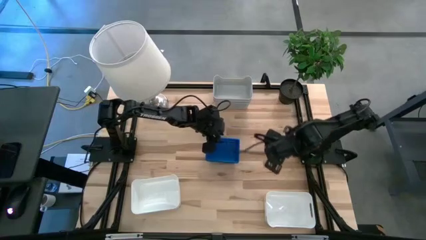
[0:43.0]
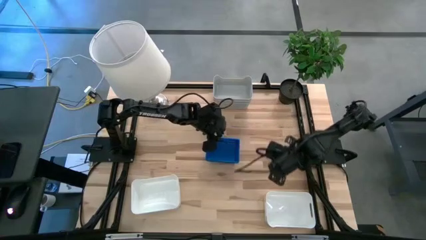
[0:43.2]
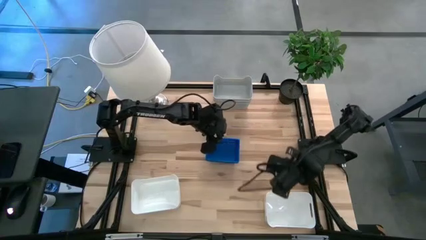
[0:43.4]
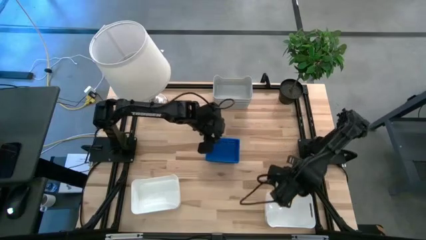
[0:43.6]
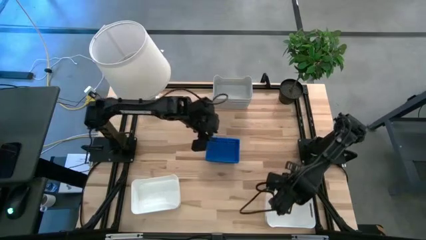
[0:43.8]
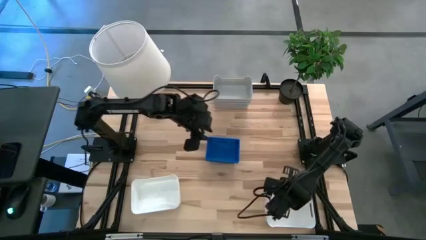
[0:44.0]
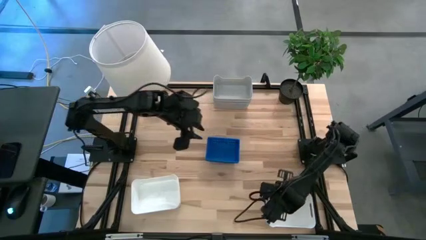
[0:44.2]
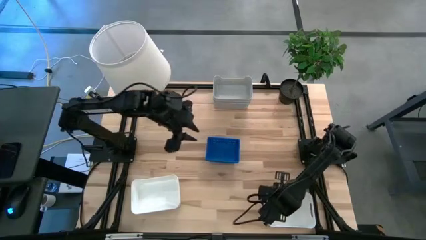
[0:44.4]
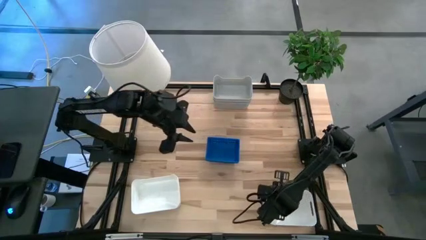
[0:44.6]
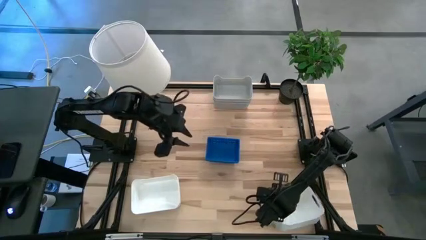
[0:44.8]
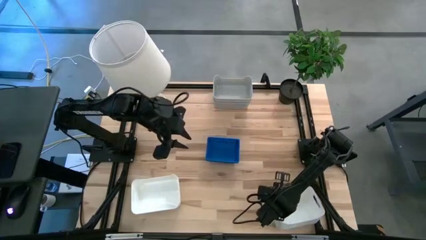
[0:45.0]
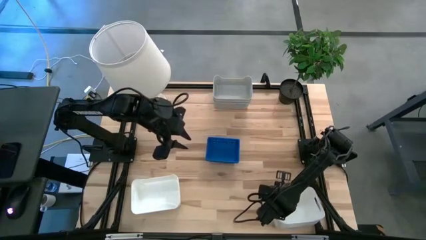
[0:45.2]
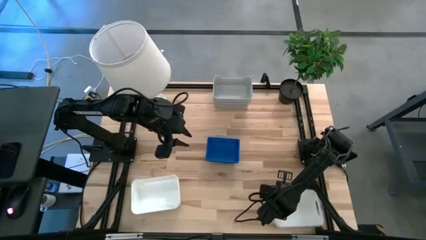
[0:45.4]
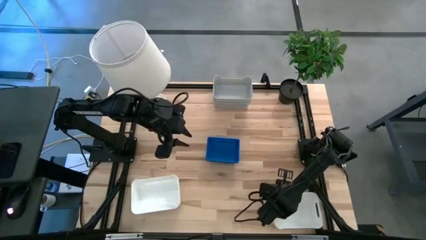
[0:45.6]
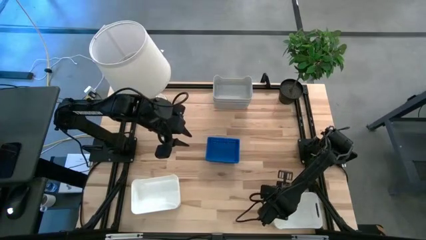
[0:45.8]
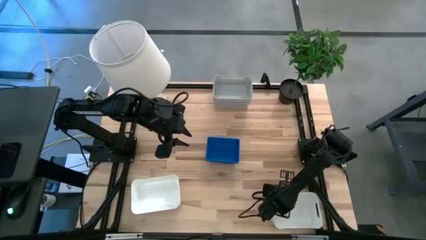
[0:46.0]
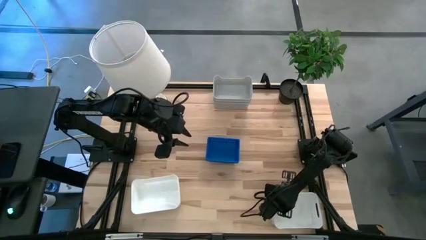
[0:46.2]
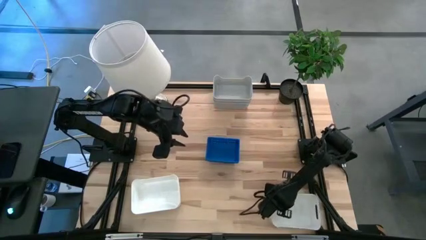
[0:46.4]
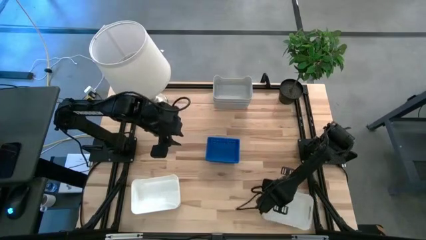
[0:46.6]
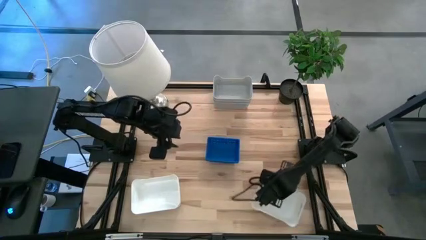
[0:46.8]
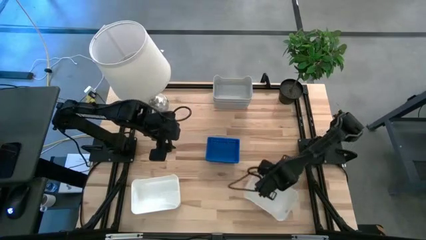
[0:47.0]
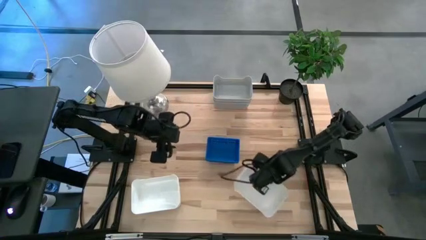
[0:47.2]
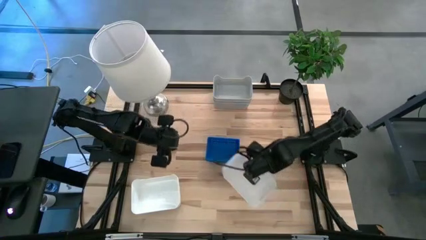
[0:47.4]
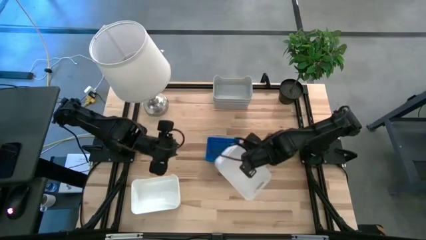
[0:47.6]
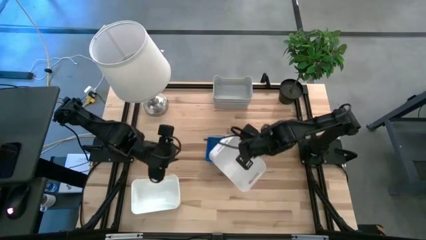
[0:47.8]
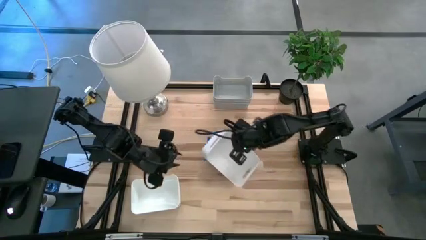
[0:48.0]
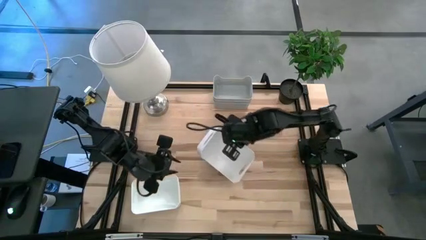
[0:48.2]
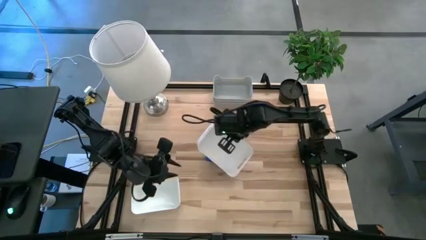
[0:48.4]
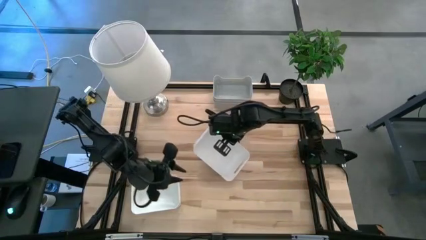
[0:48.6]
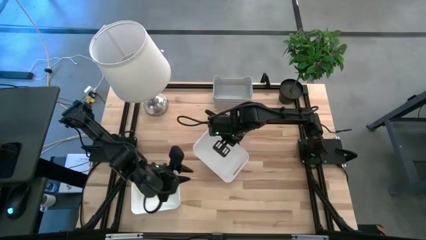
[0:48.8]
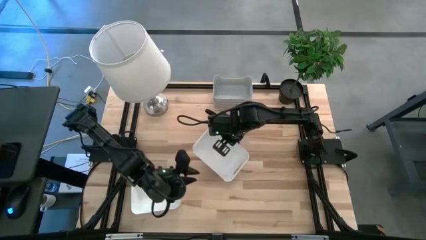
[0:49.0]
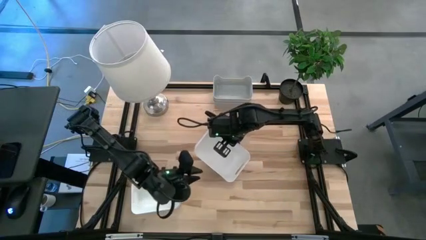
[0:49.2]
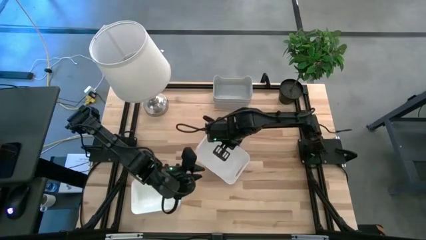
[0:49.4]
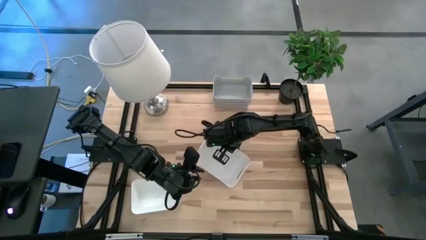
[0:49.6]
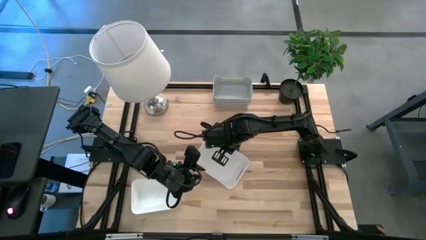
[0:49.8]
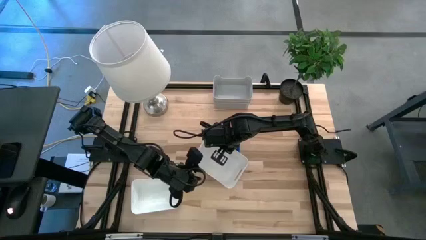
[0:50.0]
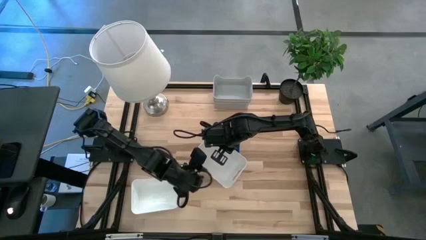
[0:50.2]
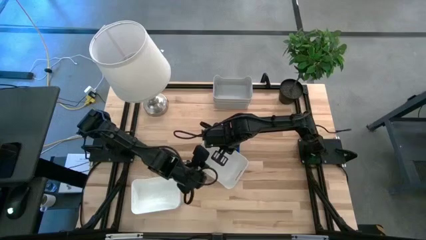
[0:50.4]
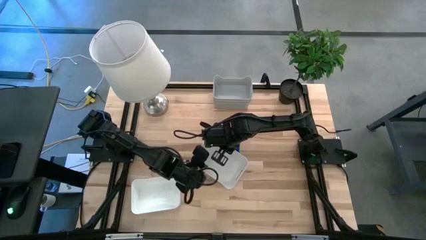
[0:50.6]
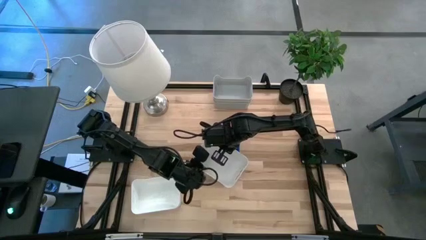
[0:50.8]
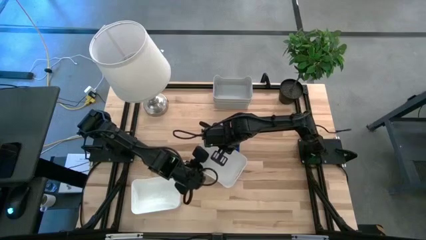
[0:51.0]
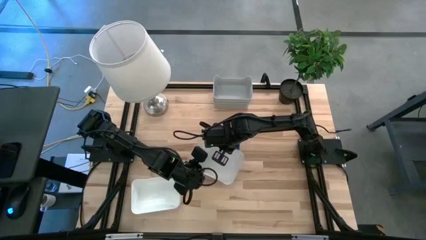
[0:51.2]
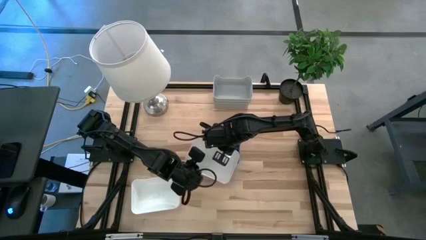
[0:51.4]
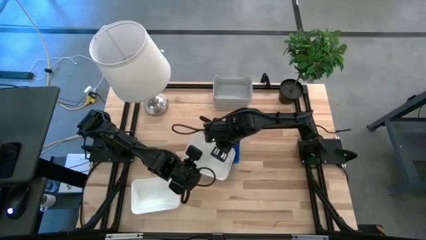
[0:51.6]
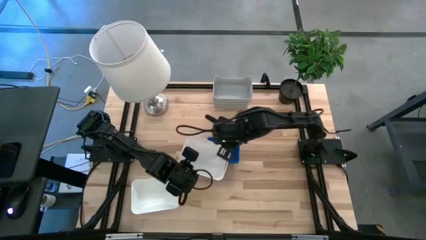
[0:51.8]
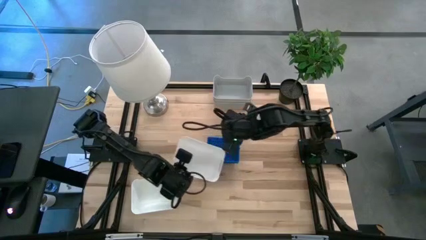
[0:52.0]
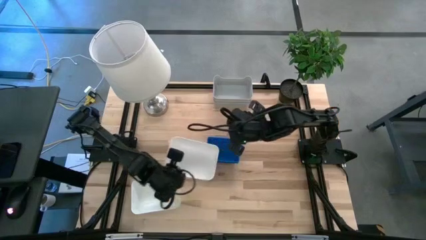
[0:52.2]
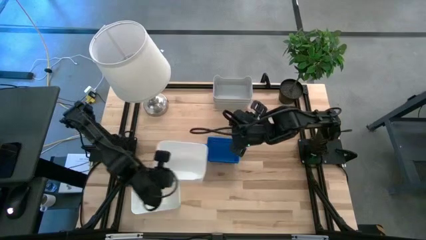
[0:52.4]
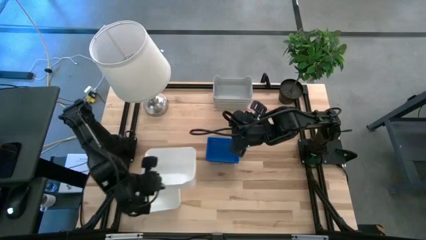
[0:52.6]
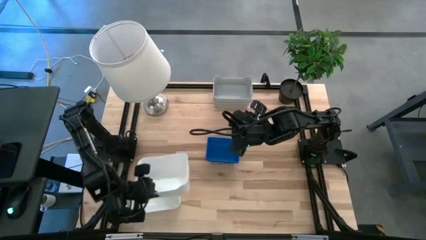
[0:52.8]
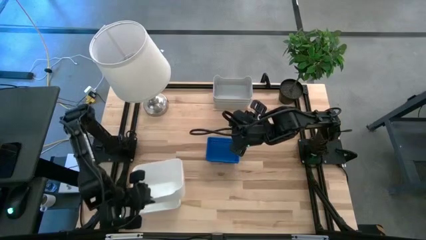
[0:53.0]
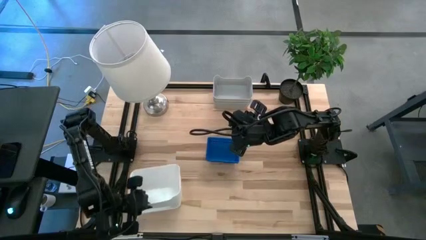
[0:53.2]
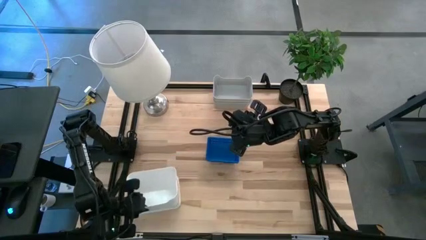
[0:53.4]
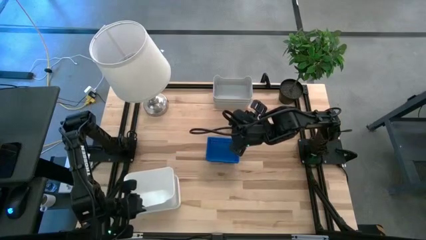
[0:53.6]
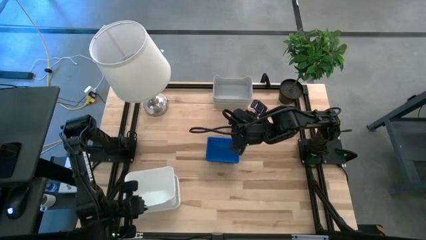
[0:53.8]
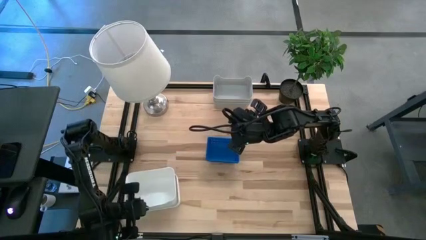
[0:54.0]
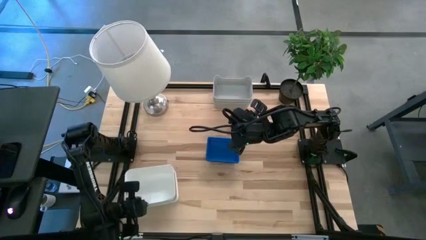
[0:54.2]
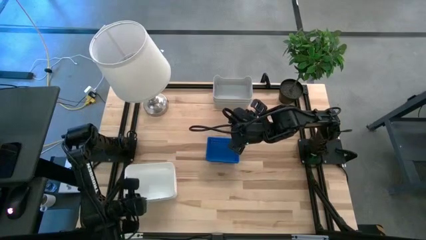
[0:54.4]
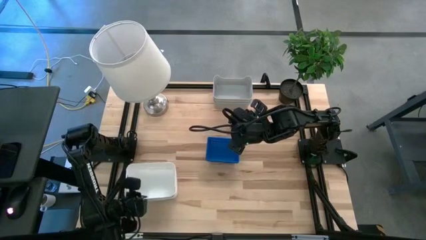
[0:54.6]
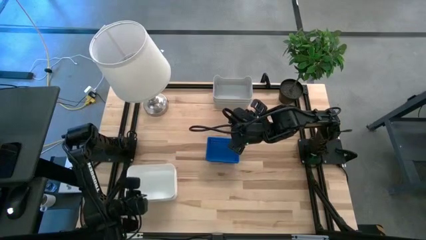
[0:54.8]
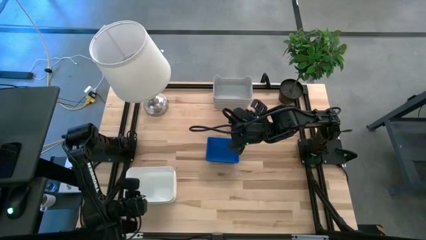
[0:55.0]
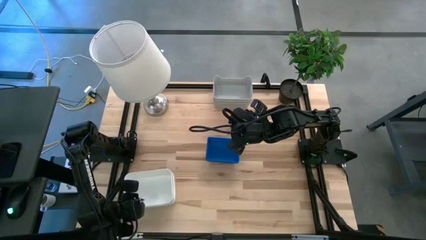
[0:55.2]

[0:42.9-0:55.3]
Stack the right white bin on the white bin
